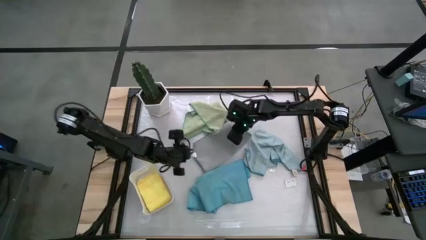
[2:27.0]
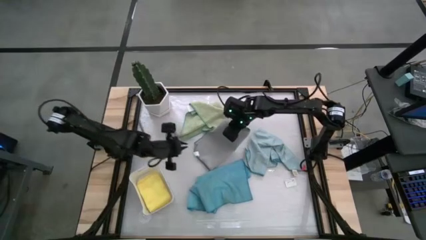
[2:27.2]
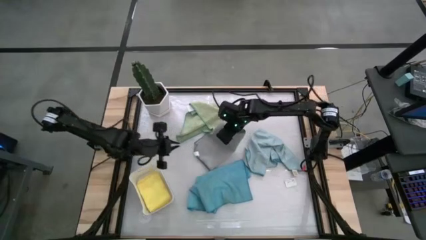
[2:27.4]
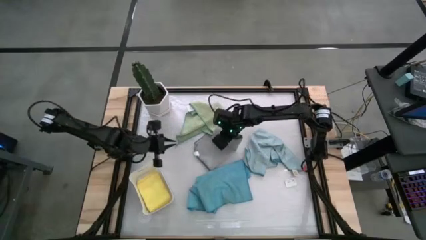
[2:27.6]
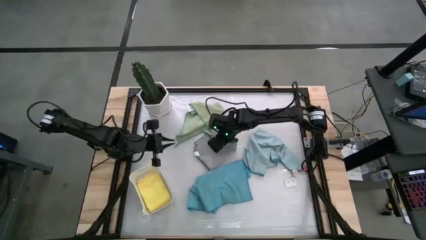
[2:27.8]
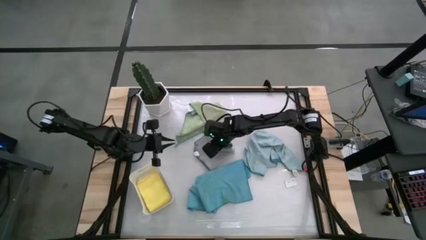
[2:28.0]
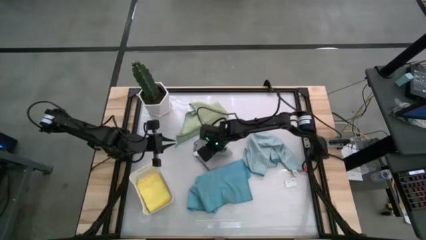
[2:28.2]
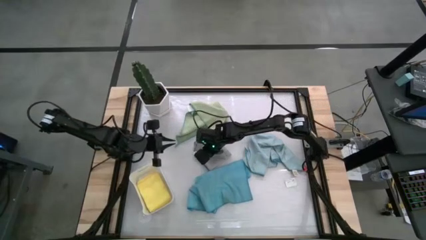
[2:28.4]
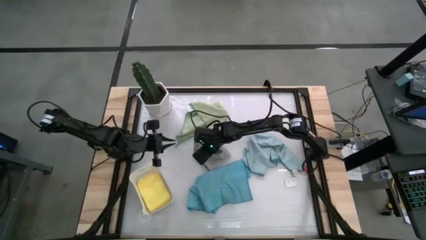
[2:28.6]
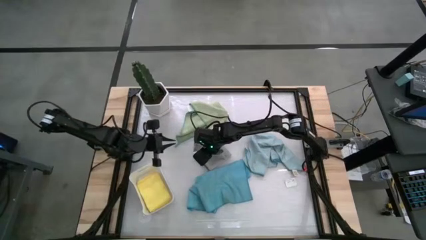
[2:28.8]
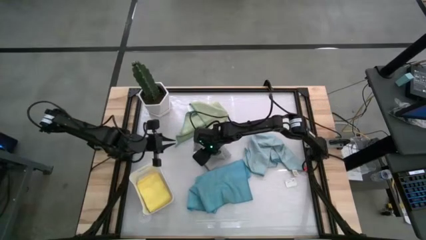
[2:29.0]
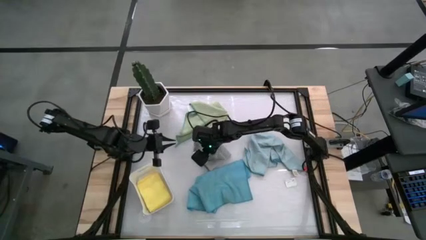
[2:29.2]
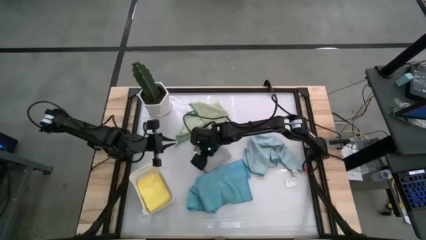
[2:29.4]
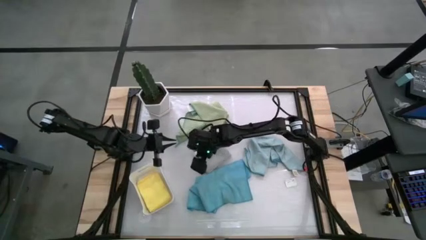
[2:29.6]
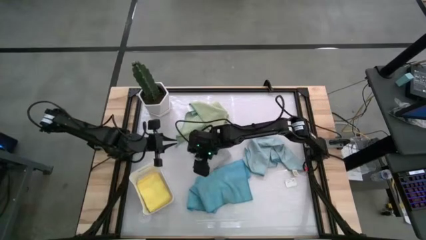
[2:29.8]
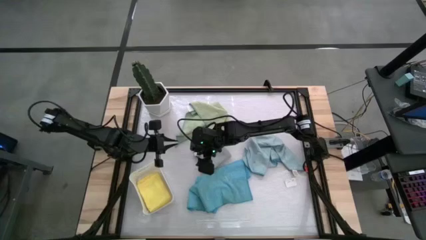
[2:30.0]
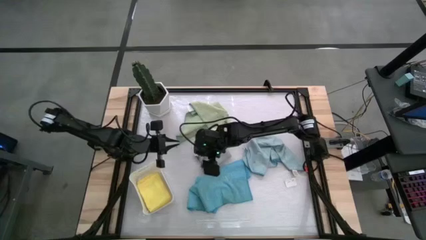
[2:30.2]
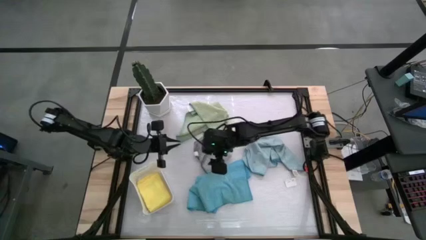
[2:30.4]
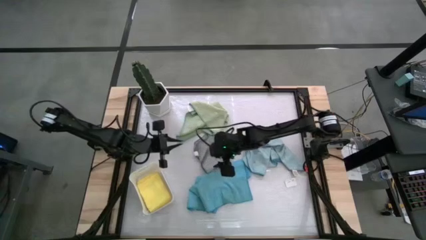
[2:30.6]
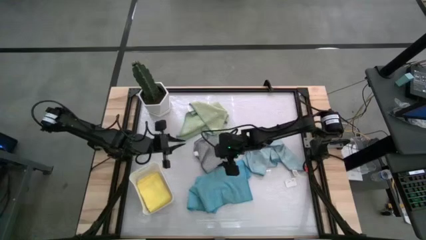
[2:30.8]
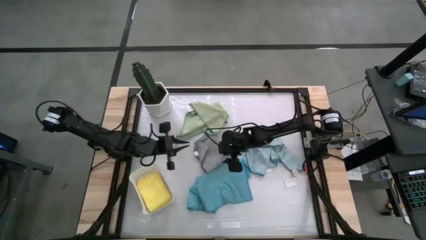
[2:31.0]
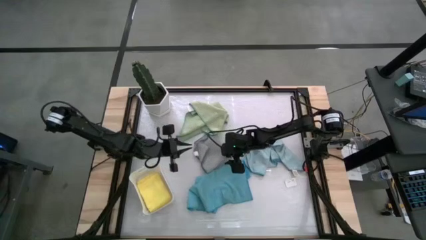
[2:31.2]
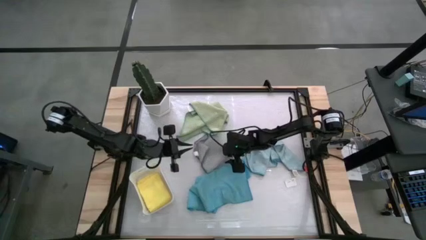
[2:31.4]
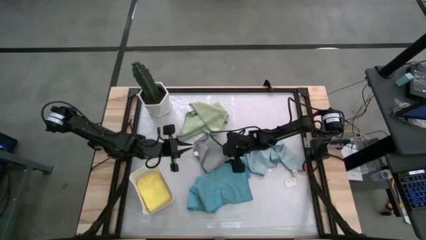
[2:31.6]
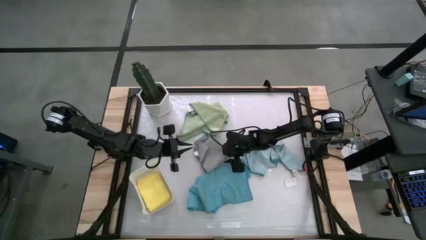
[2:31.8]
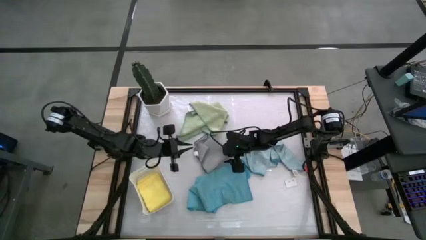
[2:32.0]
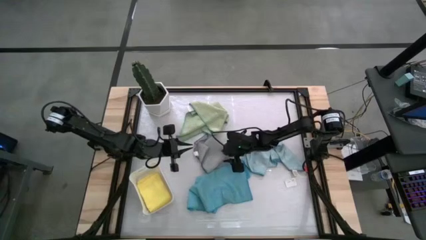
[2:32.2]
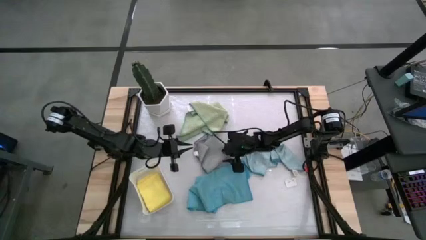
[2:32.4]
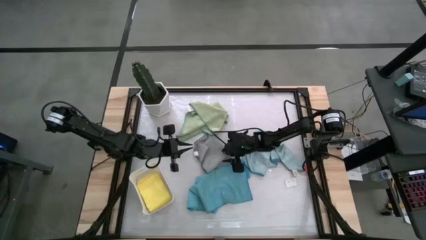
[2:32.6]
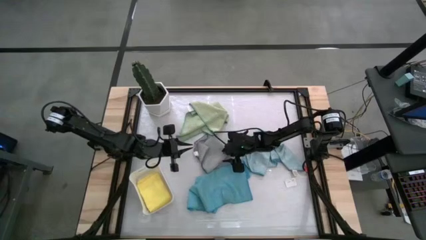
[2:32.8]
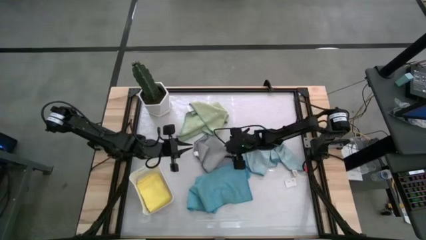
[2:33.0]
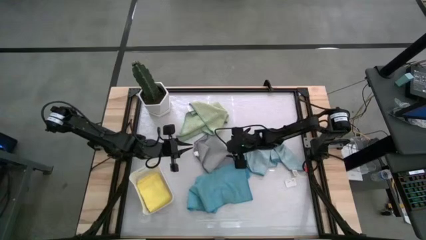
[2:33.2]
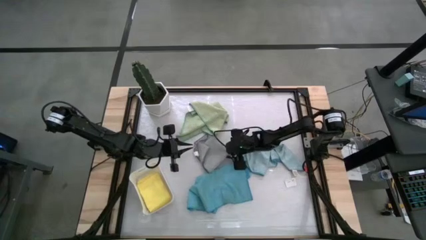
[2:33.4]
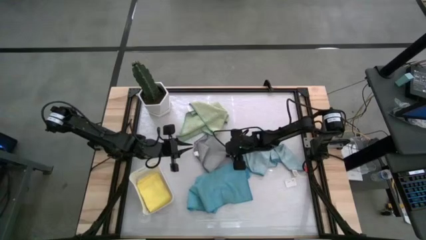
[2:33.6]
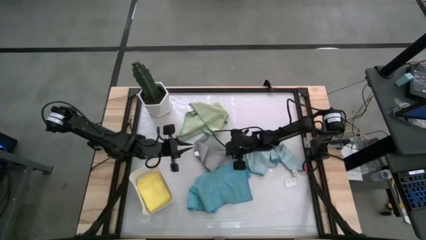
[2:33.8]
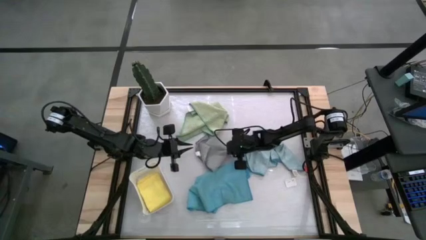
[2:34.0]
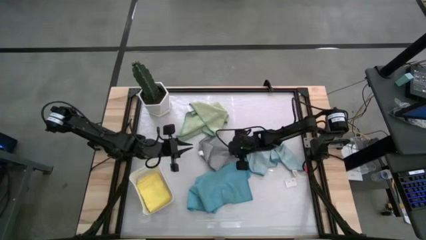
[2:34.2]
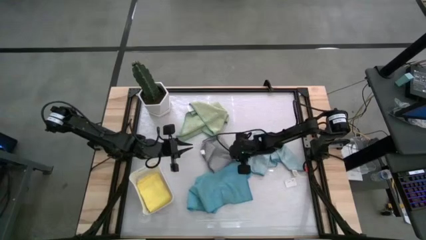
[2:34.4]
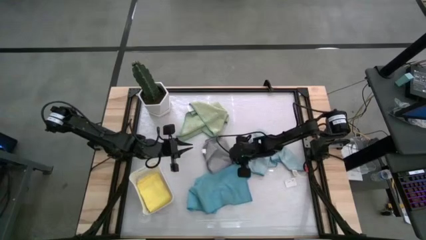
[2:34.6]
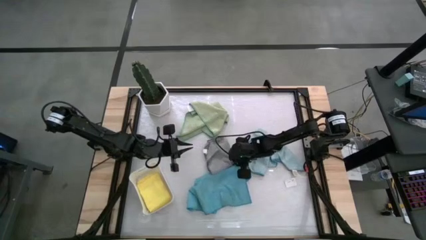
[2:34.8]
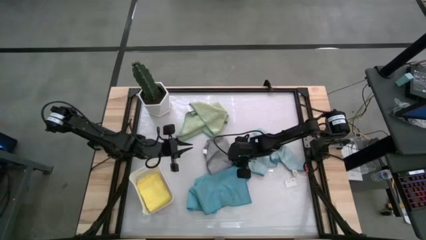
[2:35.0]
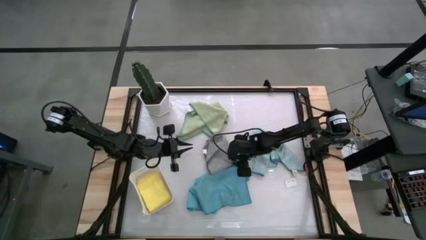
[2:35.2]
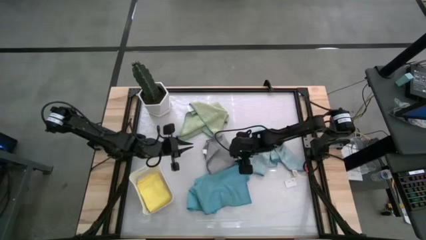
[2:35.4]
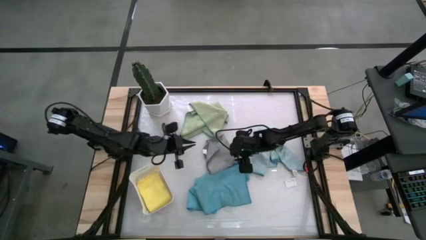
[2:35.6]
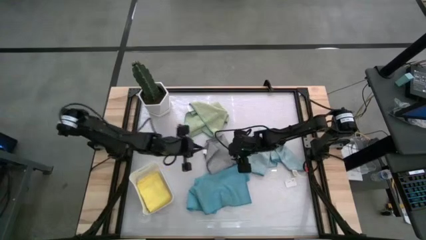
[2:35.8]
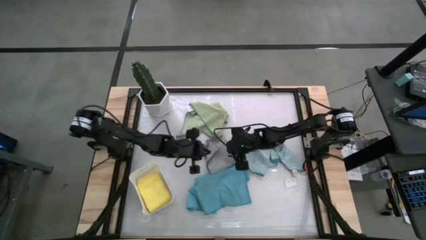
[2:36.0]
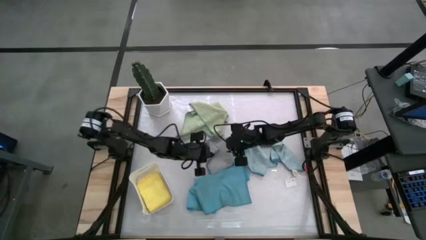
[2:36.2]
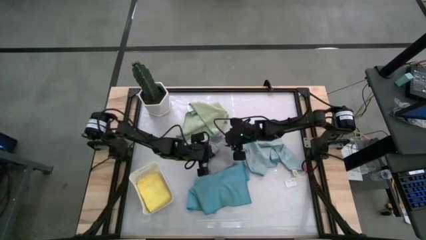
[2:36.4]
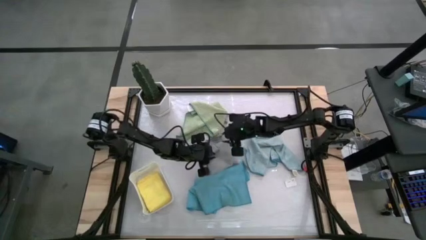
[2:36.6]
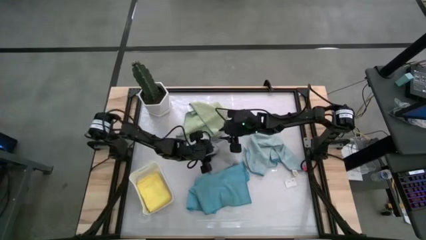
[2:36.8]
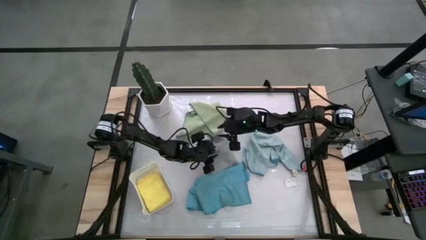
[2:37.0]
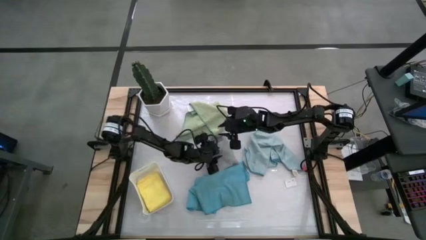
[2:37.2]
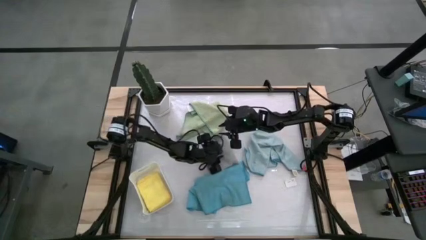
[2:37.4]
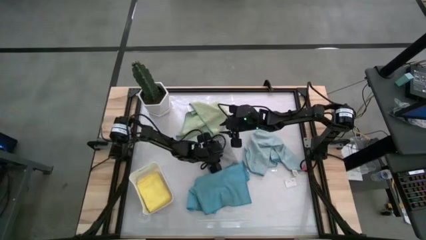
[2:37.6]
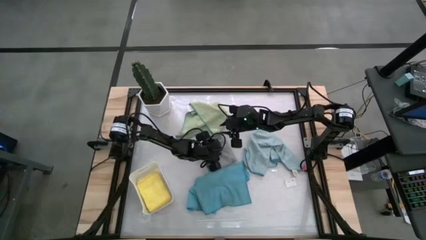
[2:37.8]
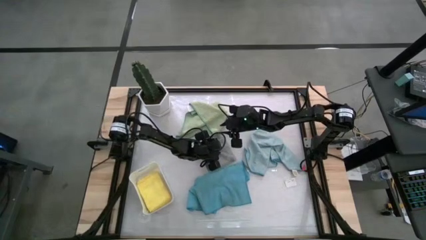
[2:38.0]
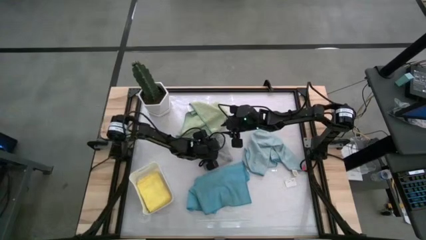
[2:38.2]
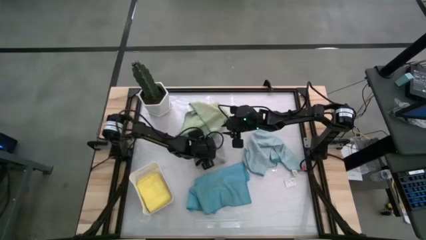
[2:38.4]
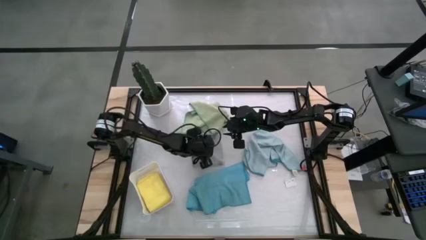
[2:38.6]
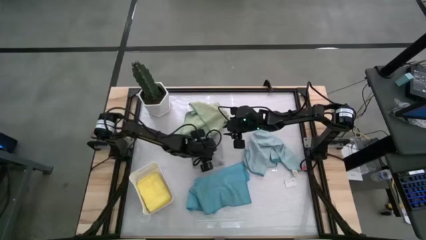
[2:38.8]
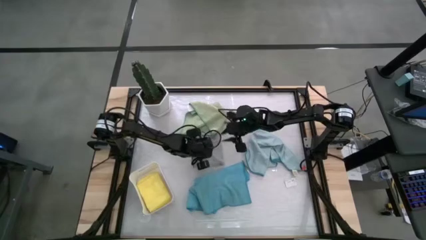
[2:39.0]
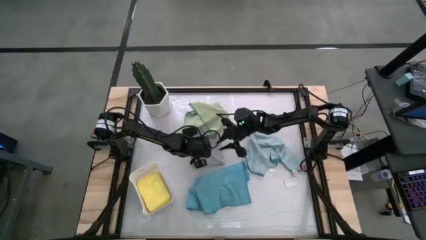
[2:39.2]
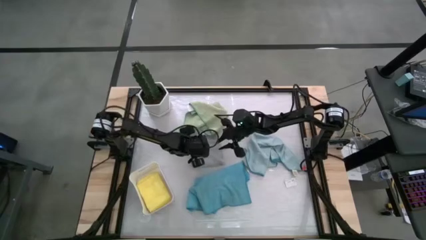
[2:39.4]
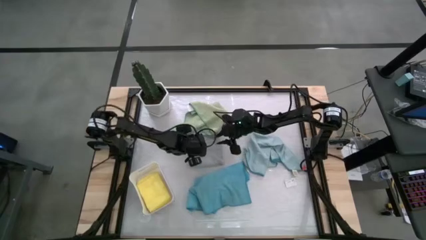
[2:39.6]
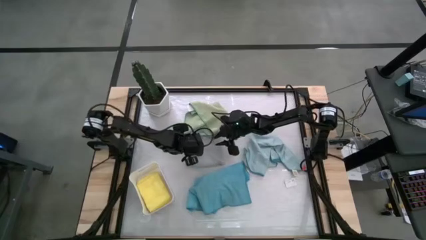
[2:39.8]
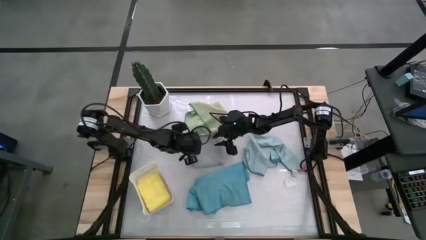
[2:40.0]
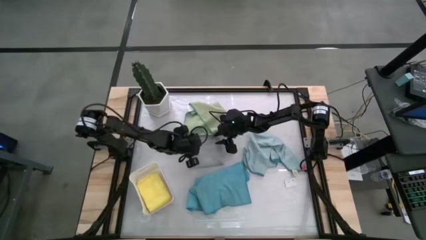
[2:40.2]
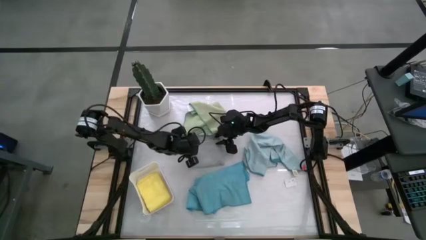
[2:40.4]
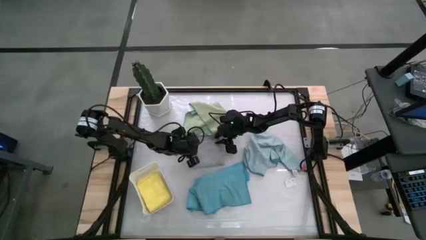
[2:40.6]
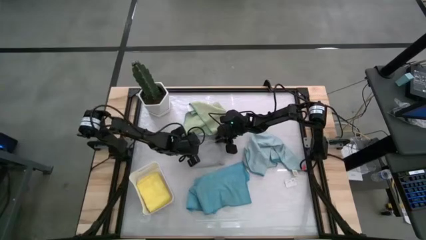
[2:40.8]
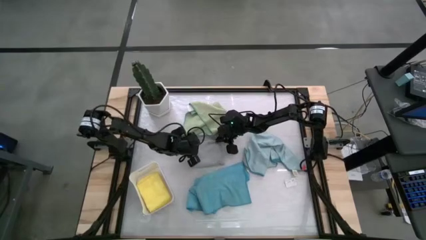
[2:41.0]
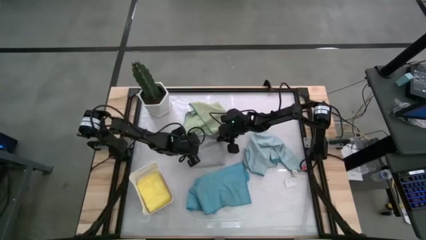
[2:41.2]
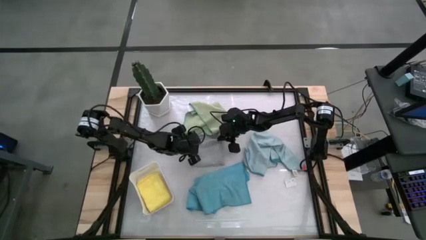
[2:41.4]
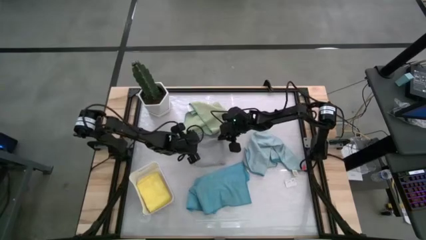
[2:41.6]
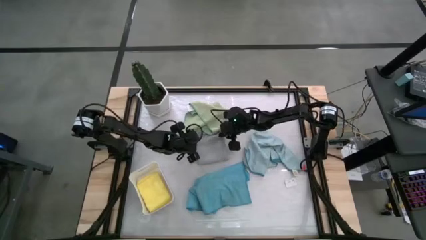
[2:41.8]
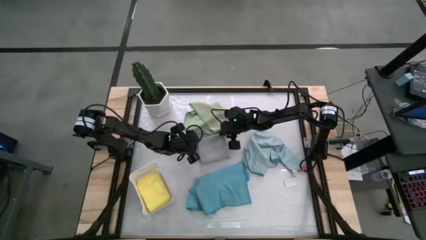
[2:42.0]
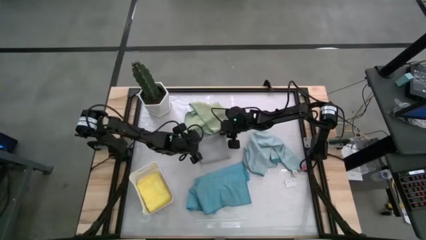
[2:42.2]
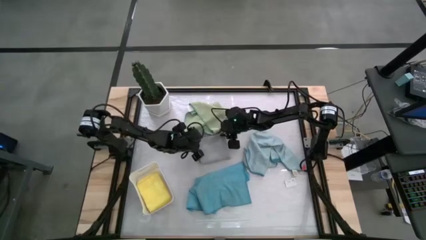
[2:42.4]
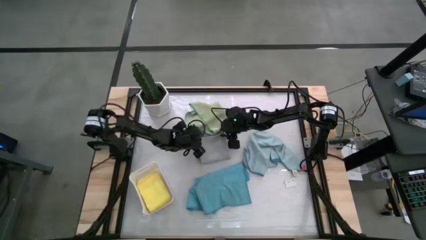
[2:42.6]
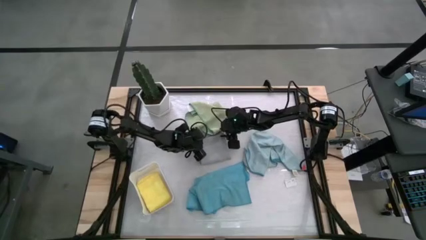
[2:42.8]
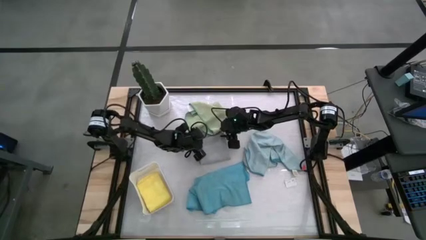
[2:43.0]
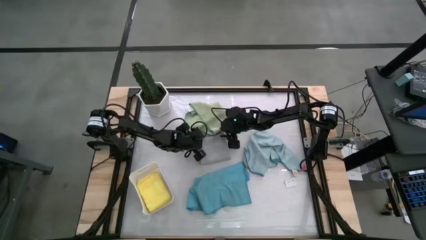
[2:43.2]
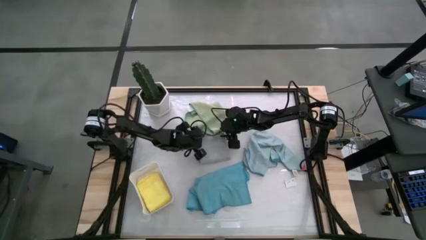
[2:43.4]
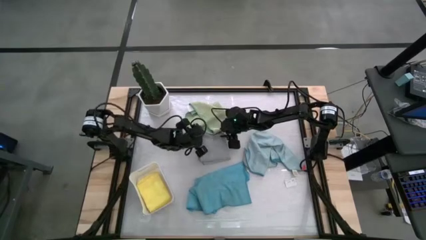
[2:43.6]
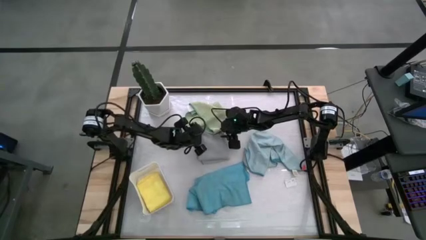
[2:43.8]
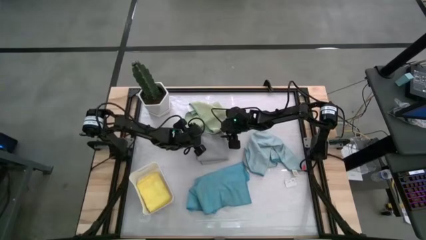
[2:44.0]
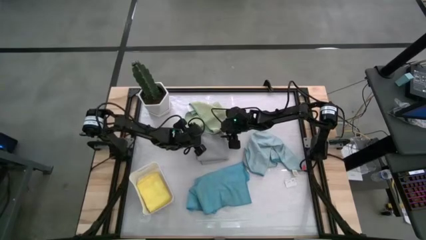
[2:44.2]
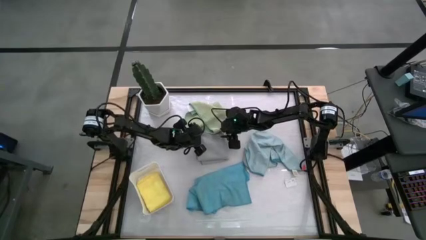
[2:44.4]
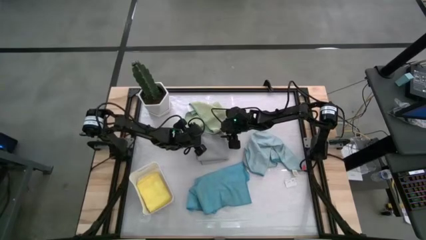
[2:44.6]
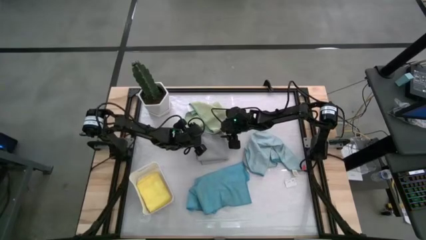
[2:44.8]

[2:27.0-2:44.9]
Task: Fold microfiber towels
Fold the gray microfiber towel
